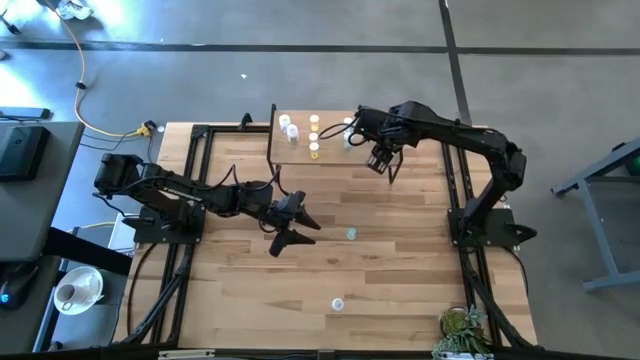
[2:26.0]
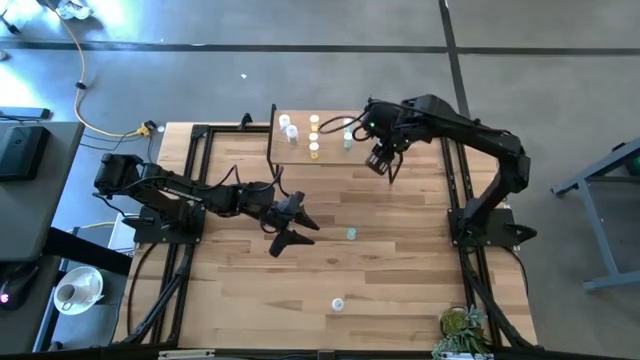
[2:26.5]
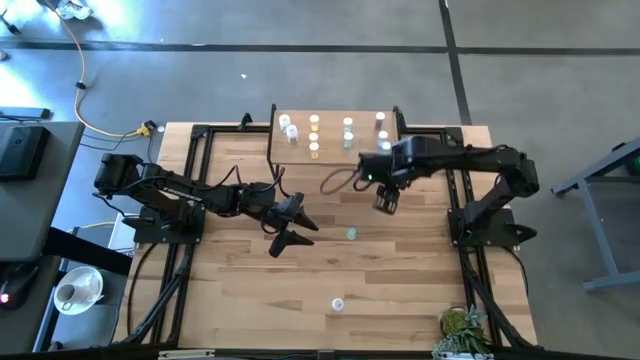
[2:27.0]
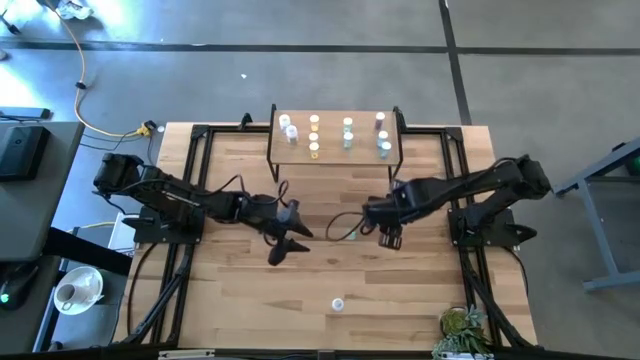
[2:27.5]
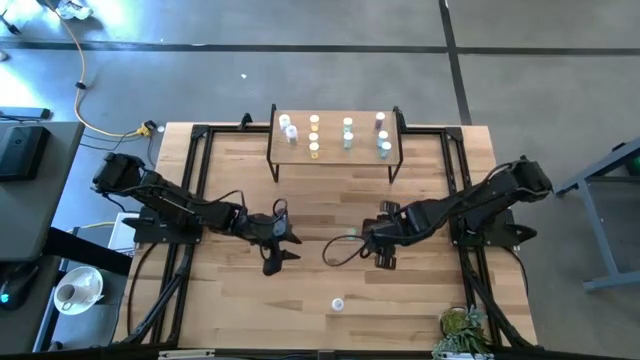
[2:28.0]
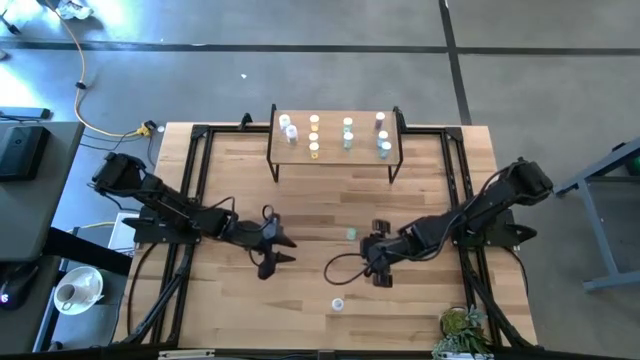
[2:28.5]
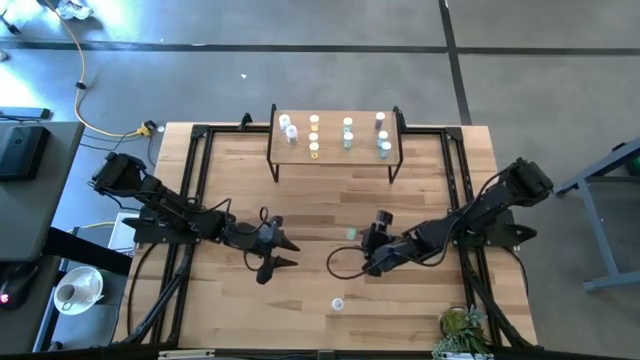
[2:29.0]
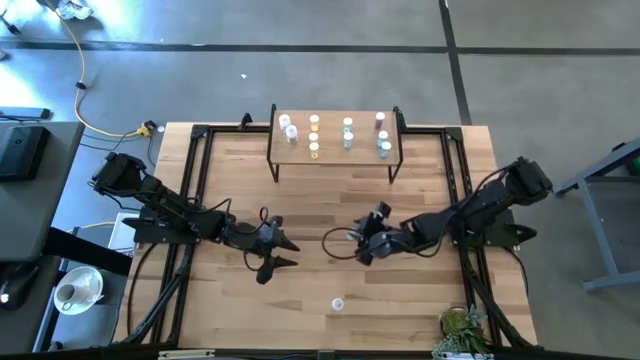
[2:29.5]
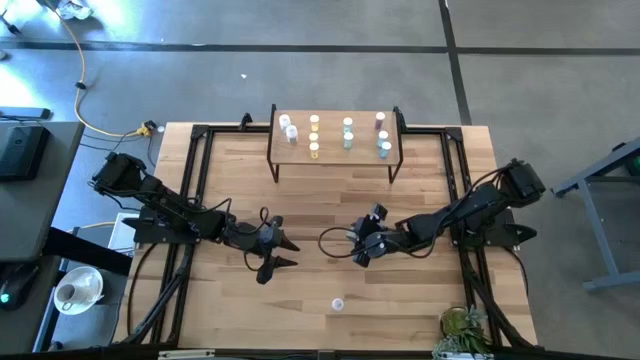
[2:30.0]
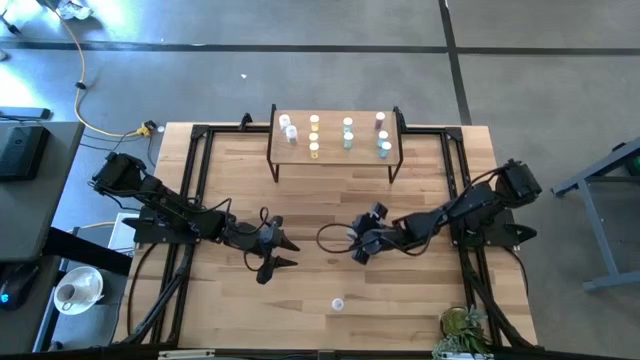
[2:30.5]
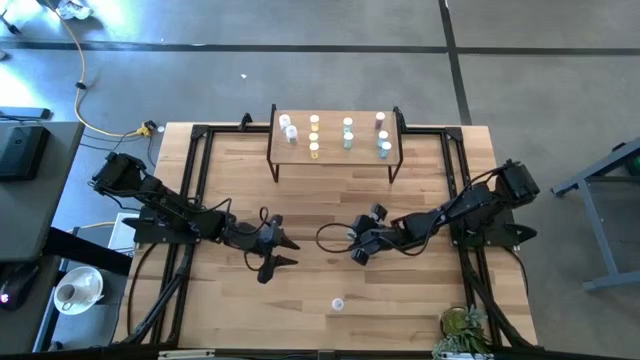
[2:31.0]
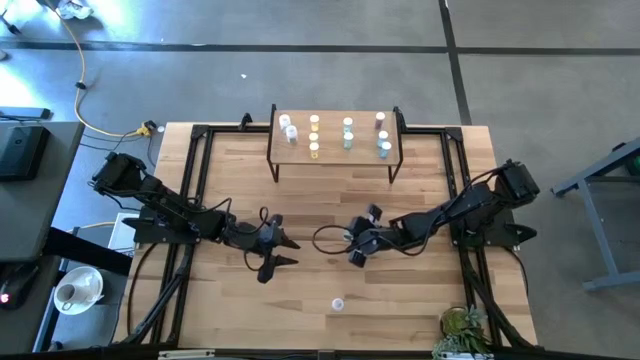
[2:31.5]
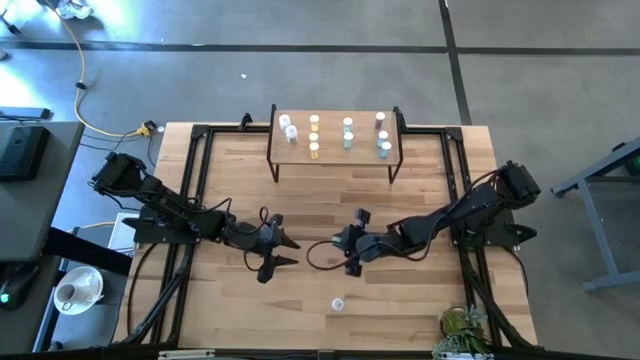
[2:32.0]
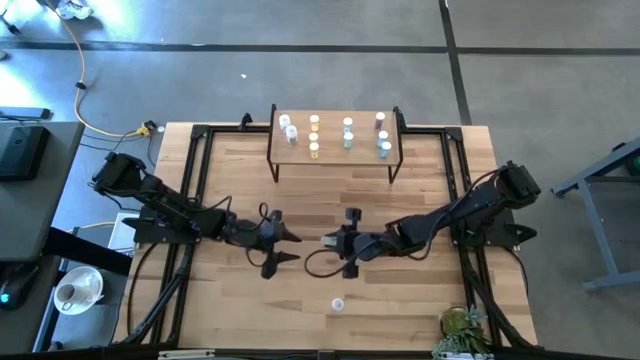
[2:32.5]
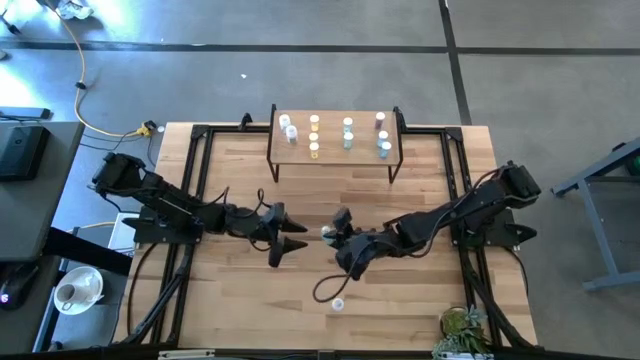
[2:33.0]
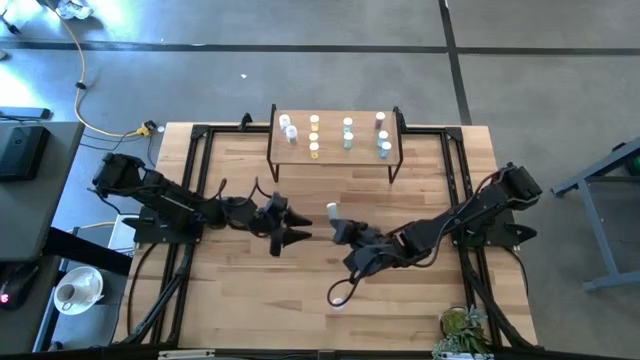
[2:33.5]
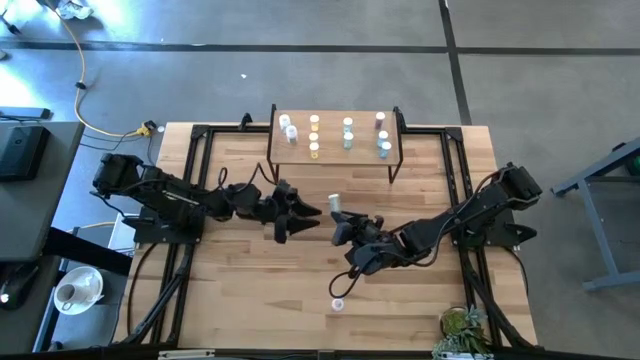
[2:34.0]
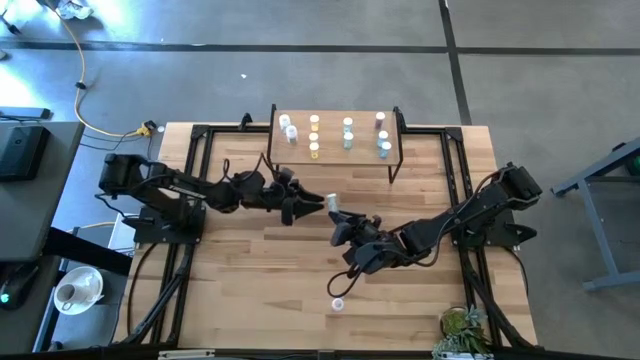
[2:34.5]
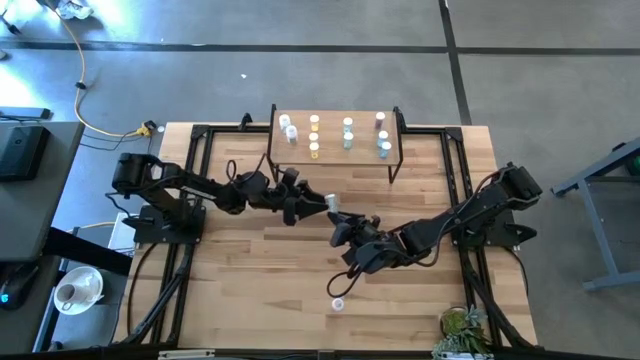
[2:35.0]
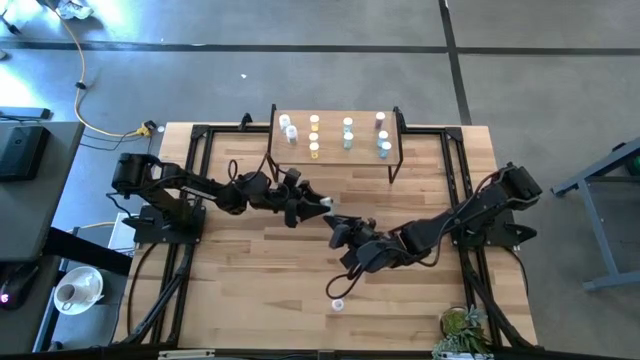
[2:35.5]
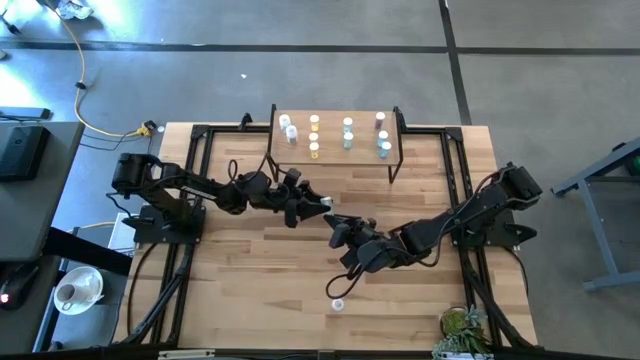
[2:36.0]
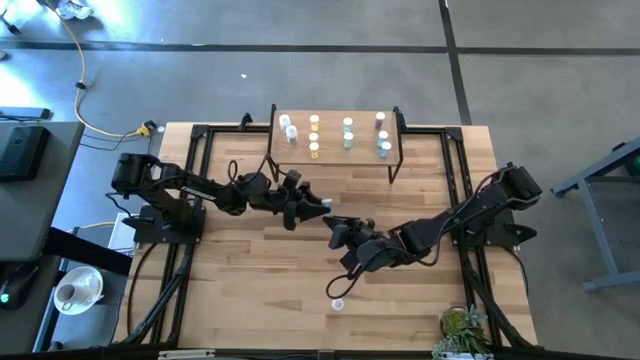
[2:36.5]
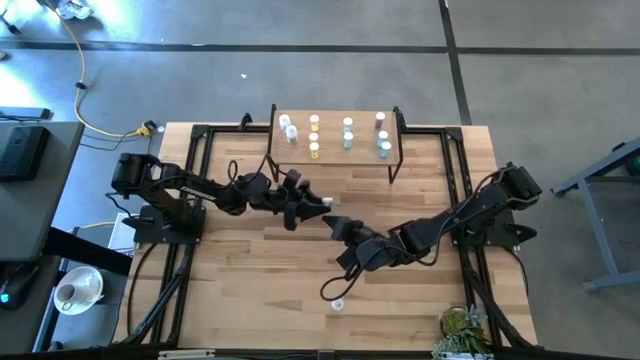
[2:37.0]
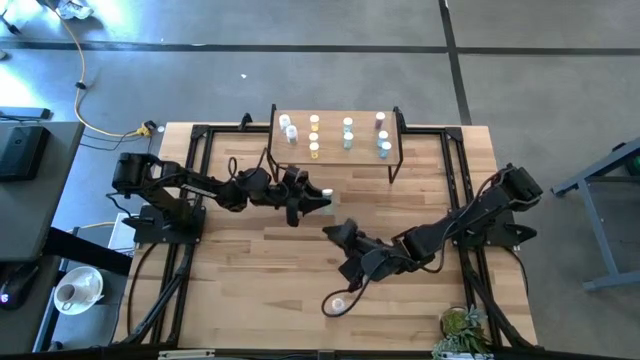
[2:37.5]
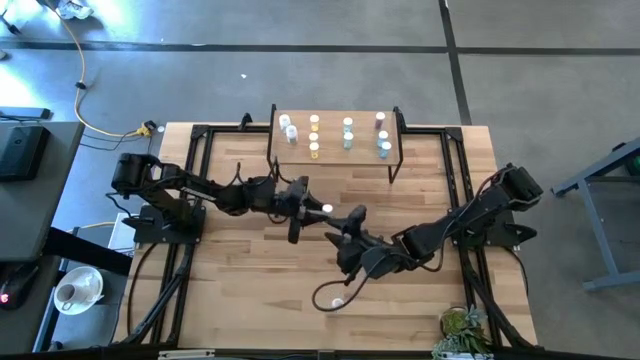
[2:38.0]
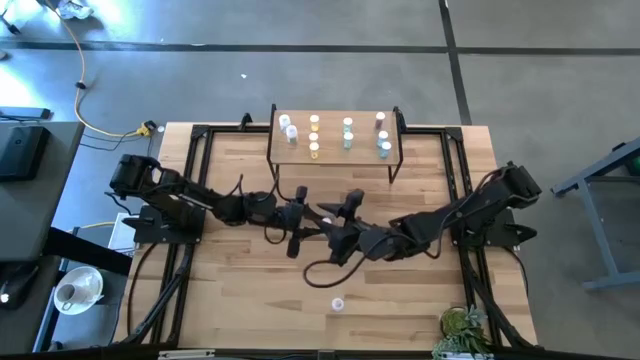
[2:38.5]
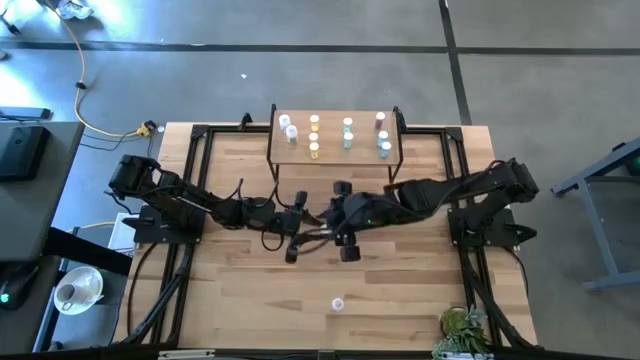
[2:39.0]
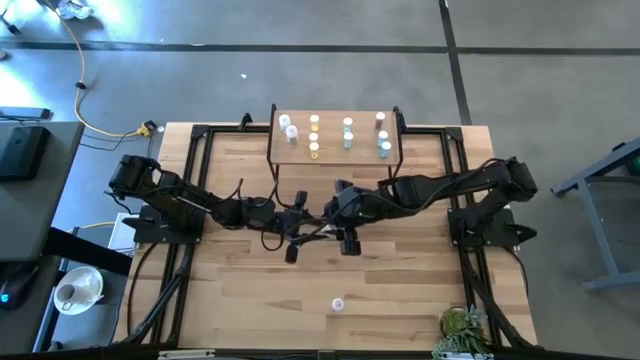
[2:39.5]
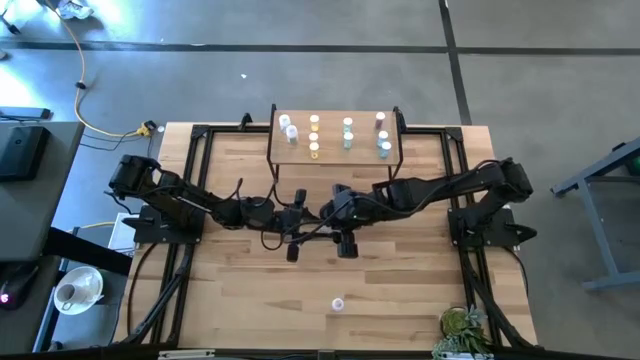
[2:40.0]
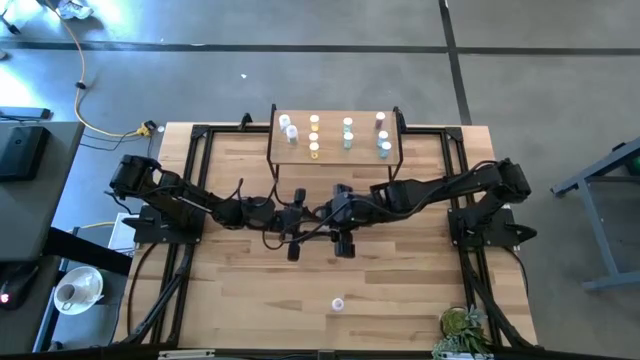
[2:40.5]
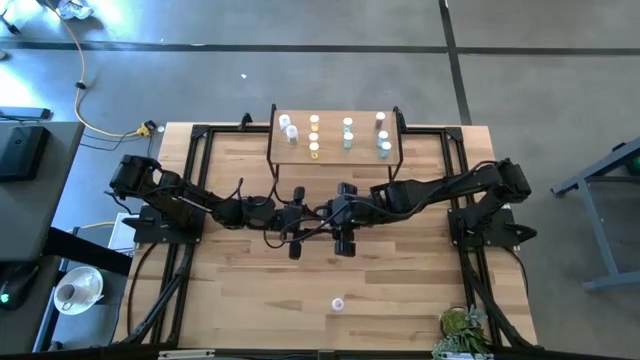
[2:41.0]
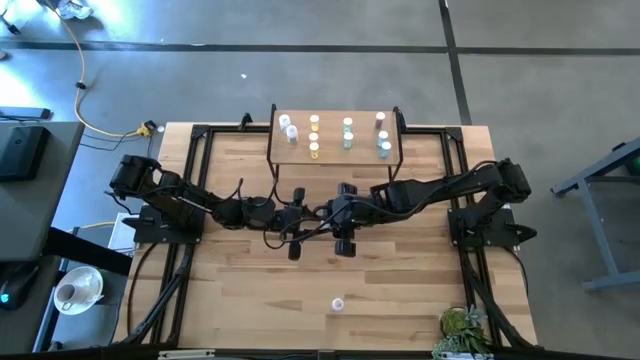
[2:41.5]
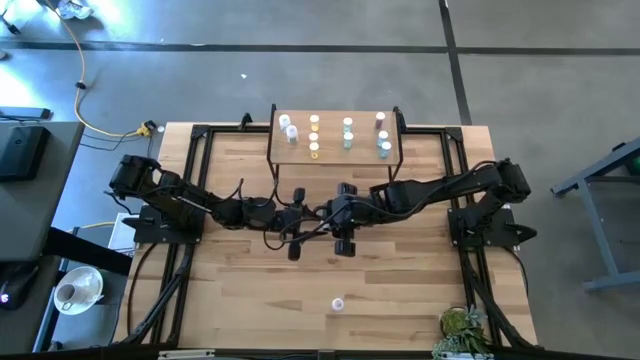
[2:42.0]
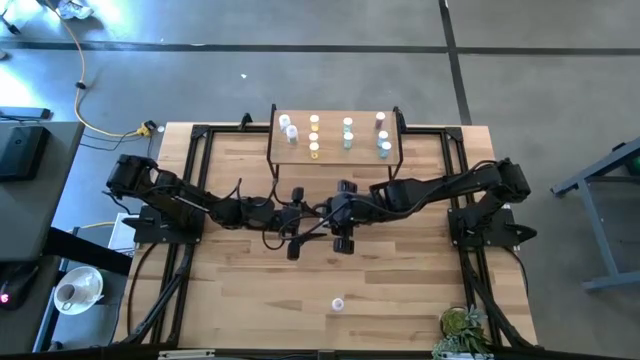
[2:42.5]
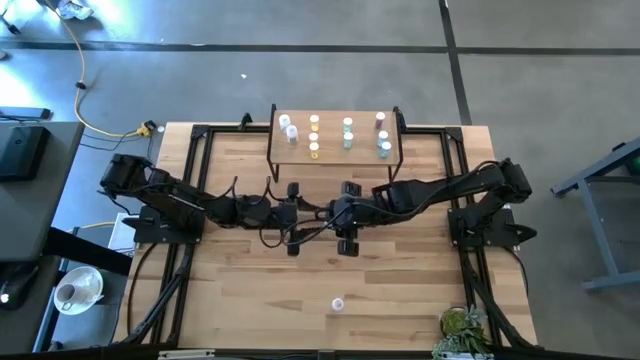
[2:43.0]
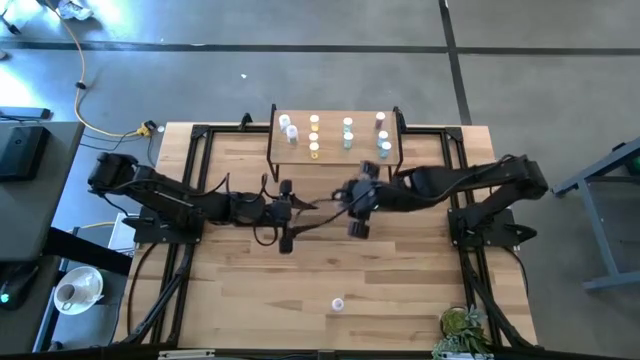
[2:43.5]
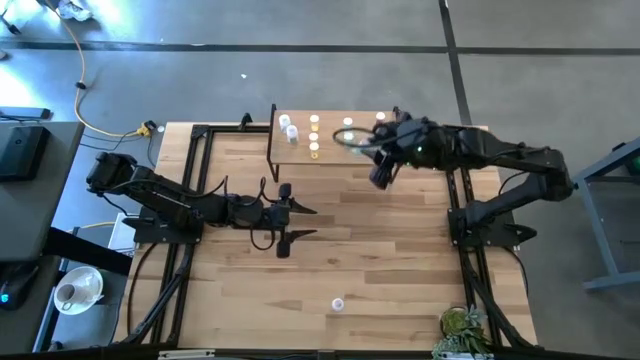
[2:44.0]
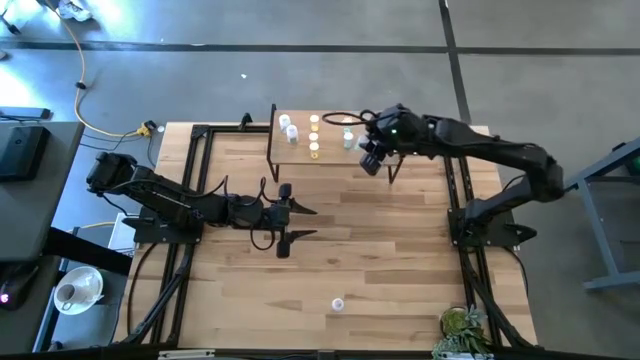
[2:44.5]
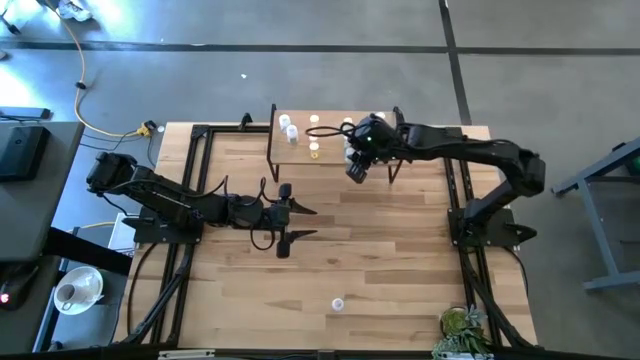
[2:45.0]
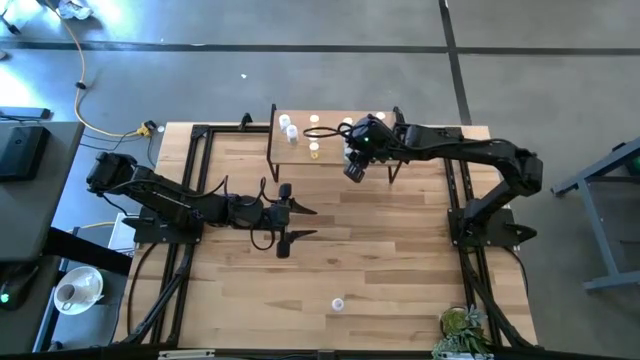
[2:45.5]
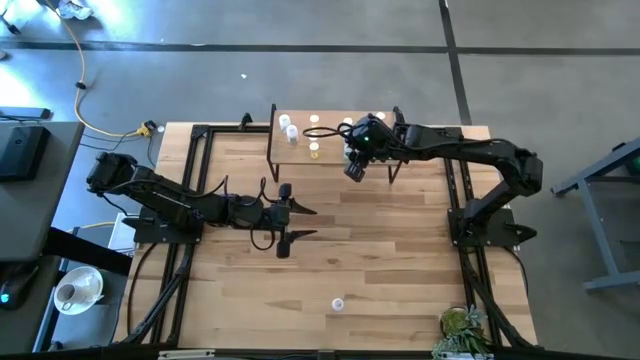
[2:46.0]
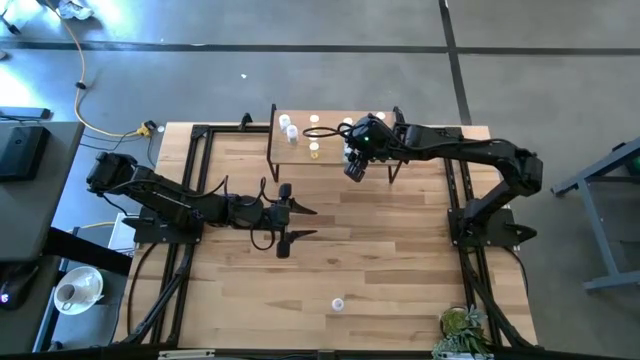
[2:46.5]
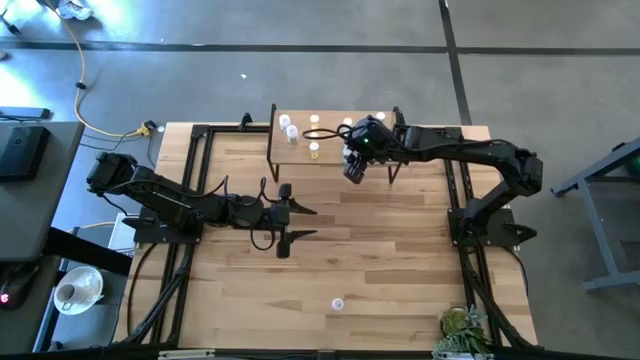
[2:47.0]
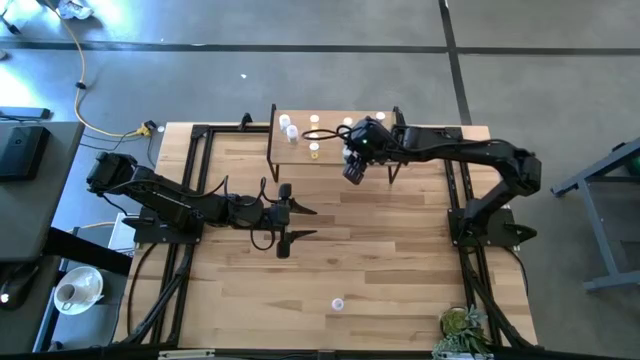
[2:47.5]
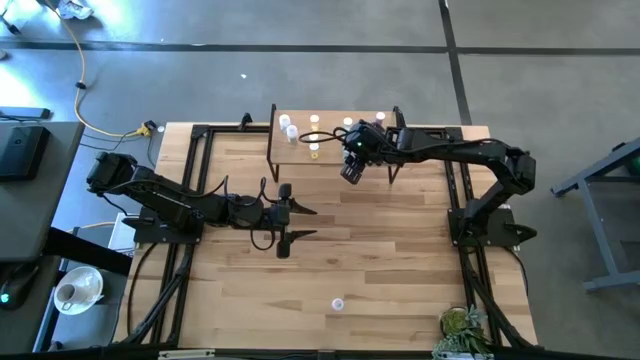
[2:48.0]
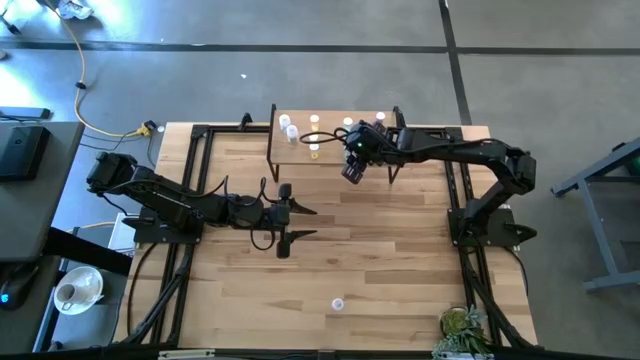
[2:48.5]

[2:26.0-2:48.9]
Task: Pick and place medicine bottles onto shelf by color
Put the green pill bottle on the shelf aligned with the other green pill bottles
